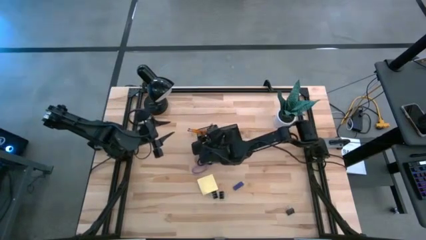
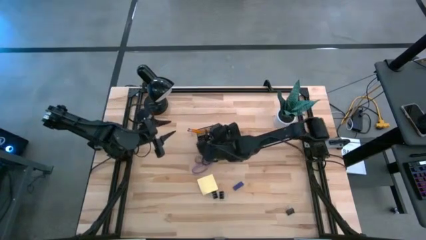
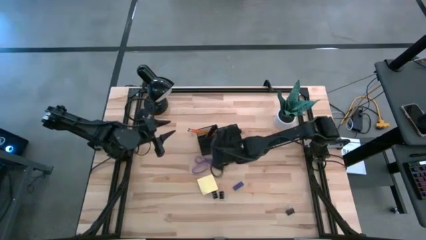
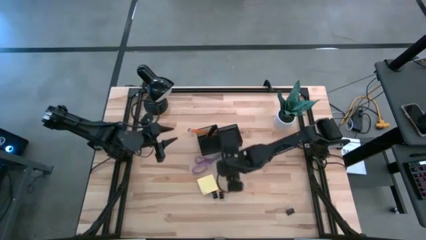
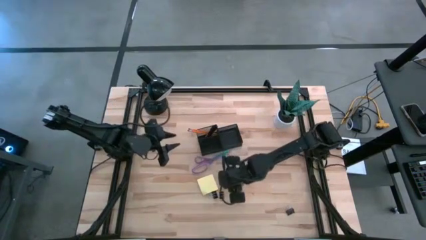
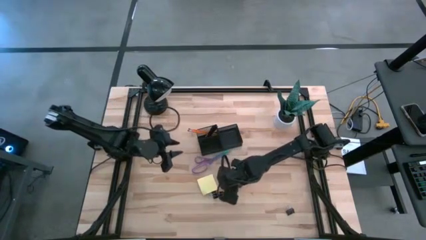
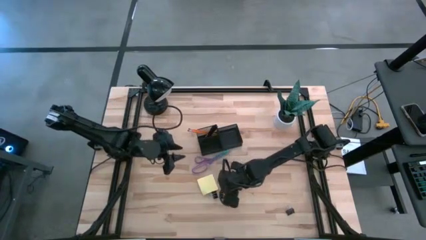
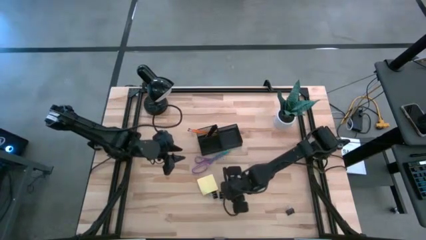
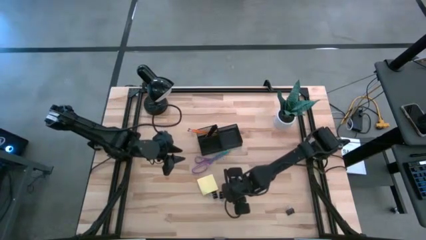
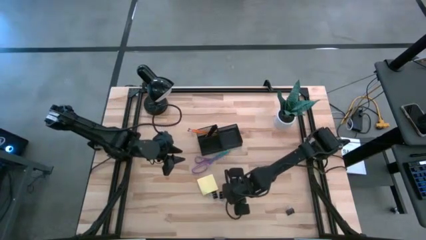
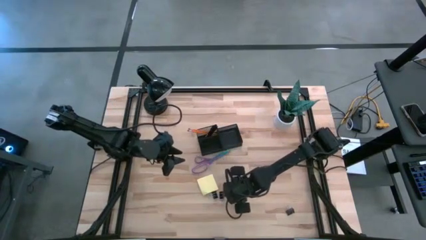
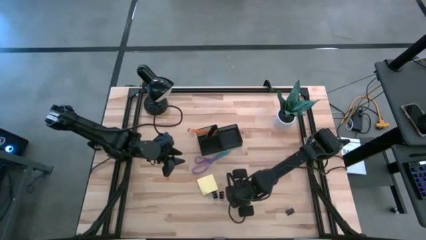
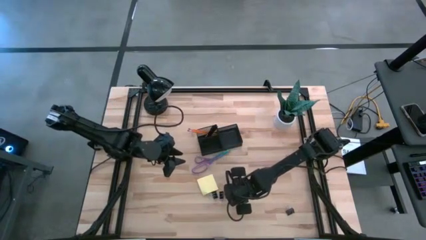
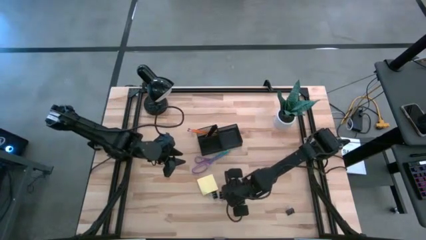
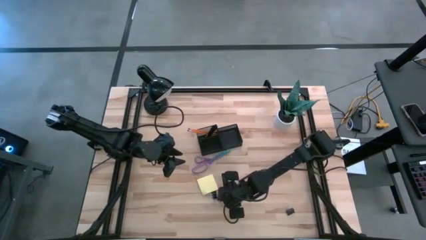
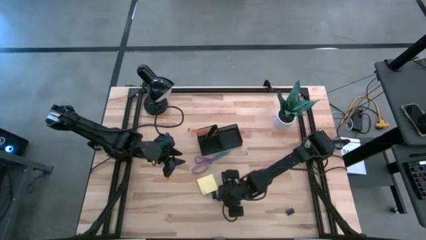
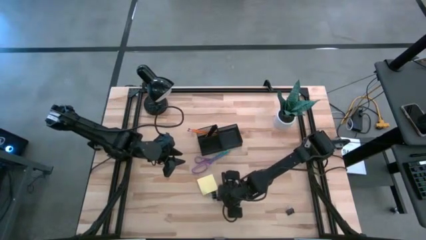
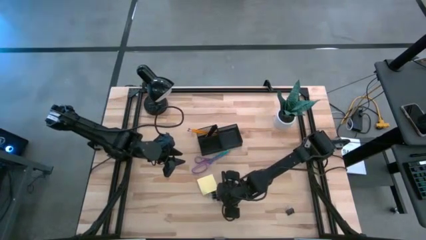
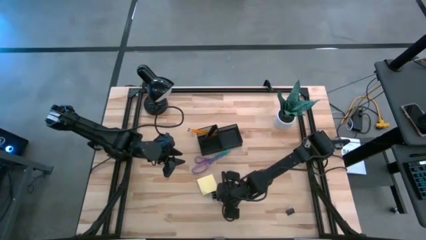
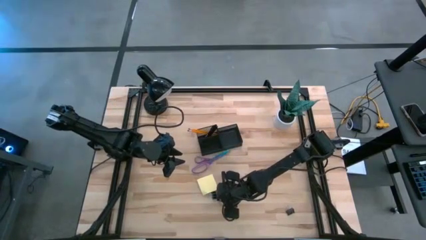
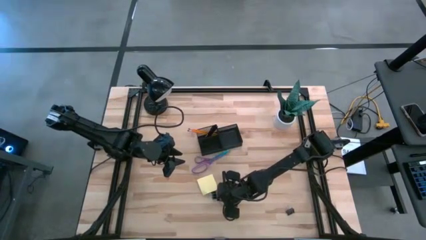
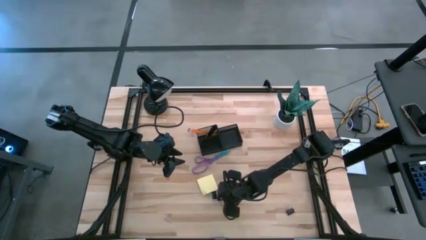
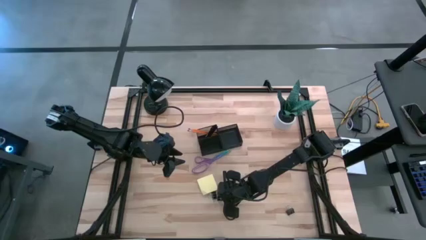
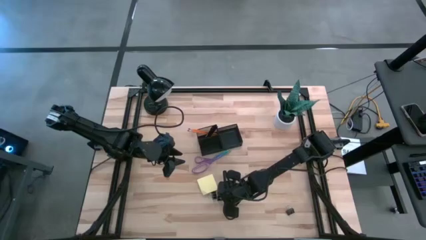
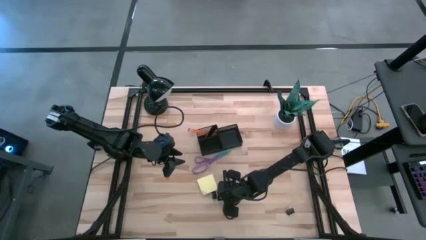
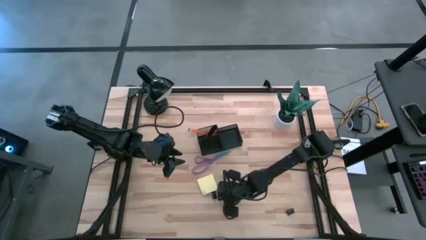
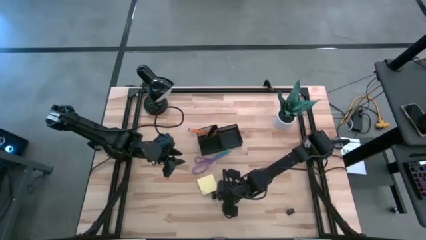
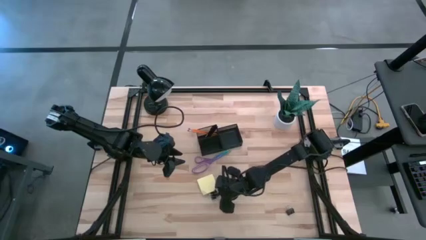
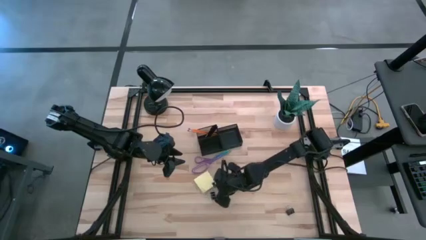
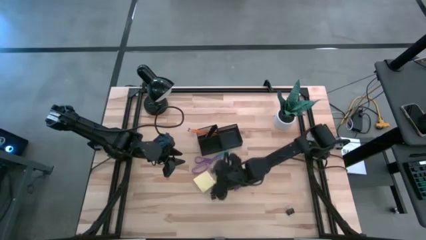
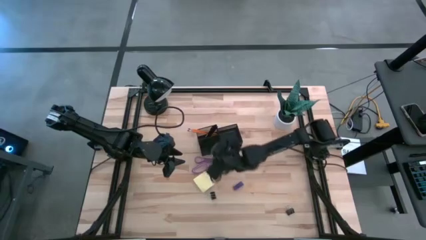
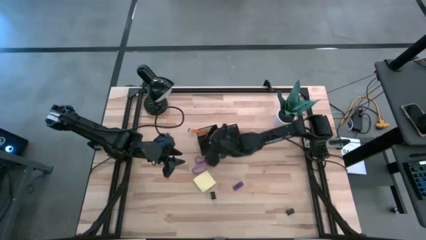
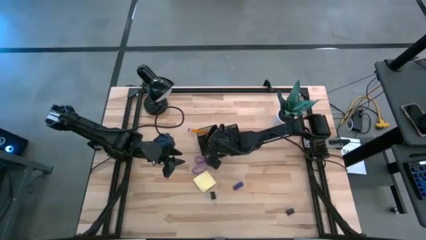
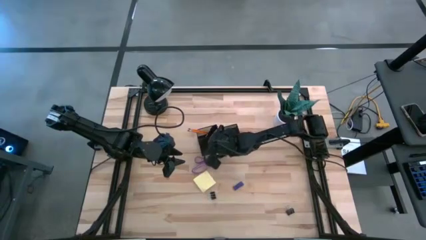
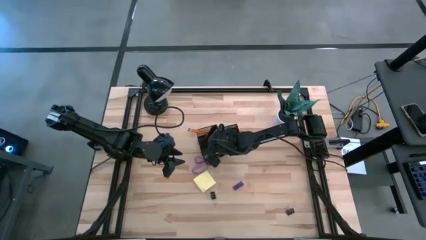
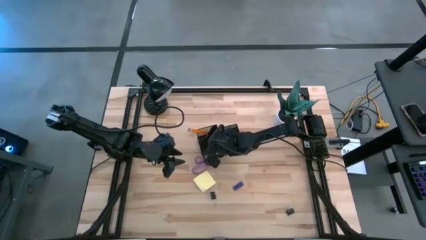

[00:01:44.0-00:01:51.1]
Task: Pick and place office supplies into organizer
Put the middle black binder clip into the black desk organizer

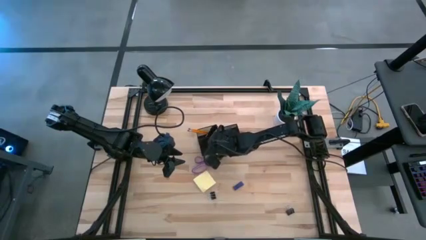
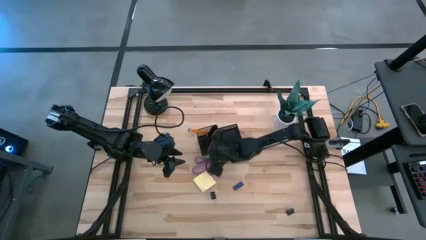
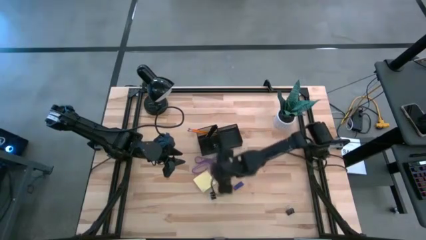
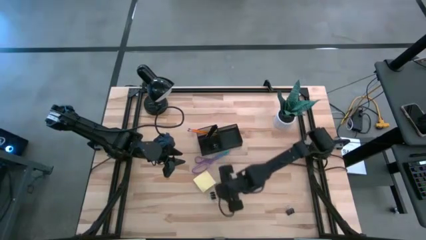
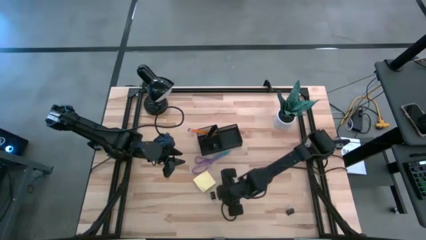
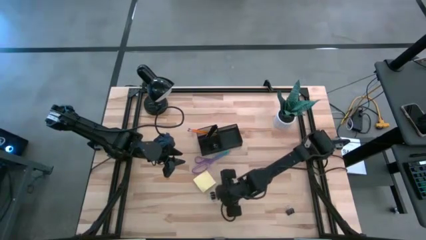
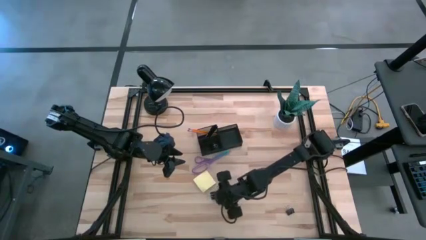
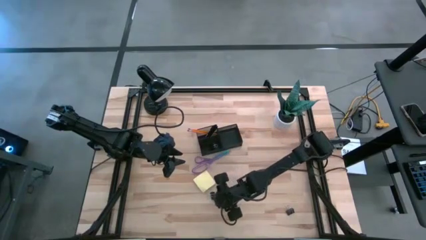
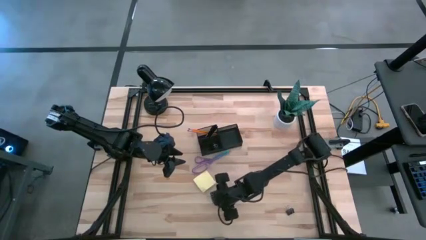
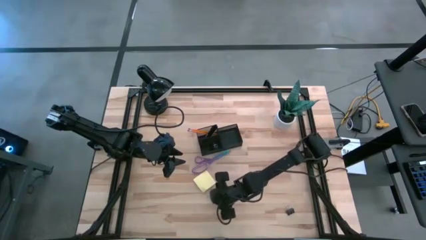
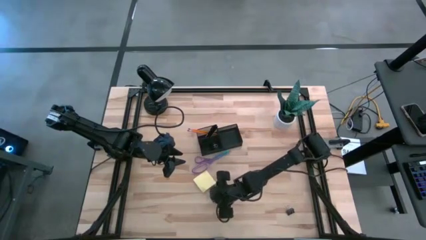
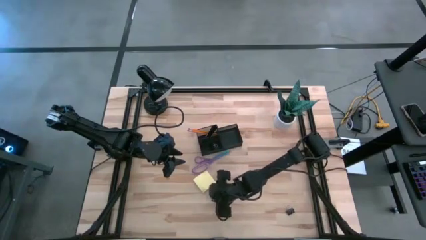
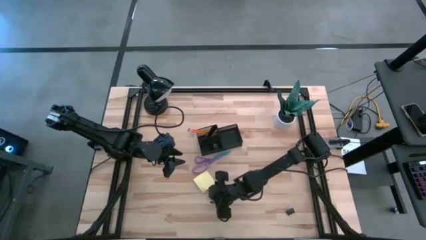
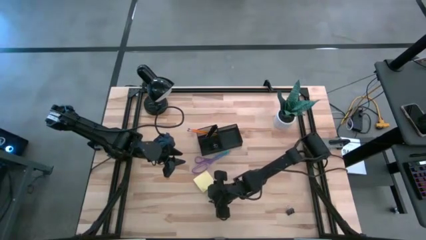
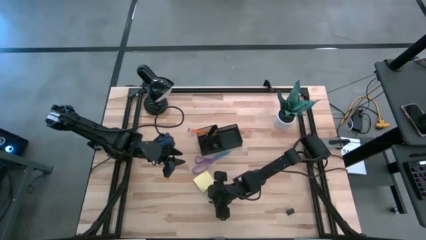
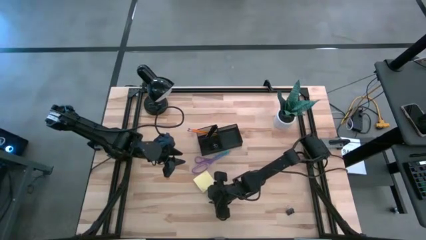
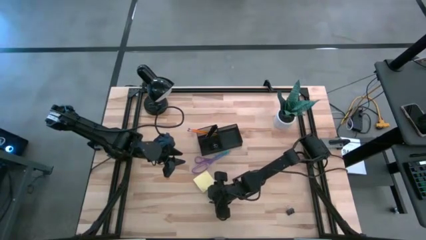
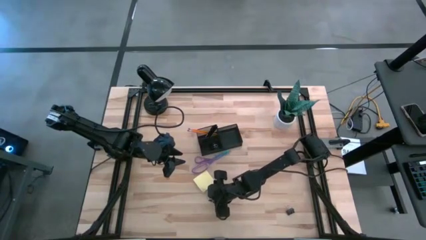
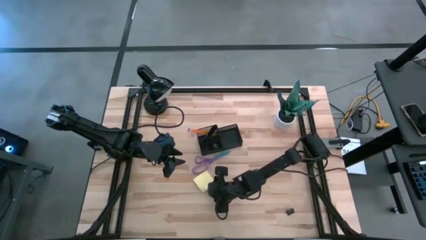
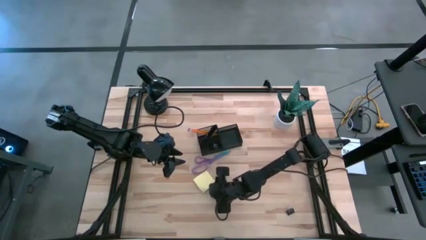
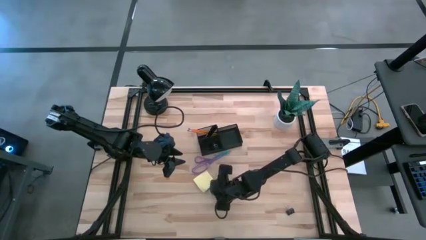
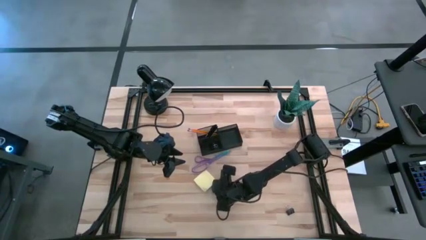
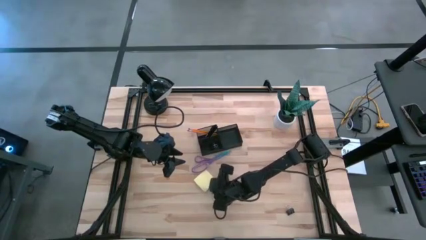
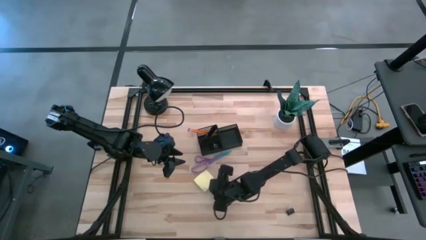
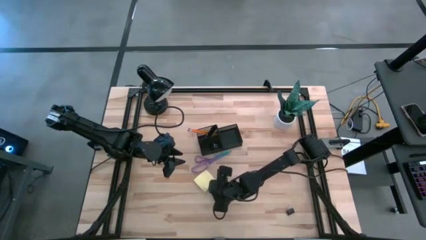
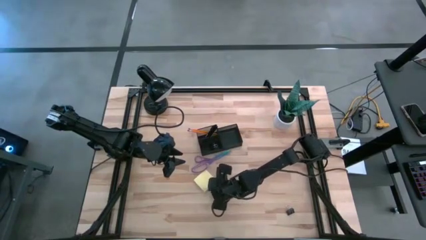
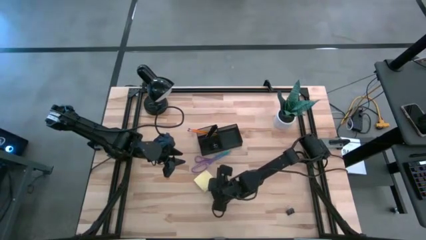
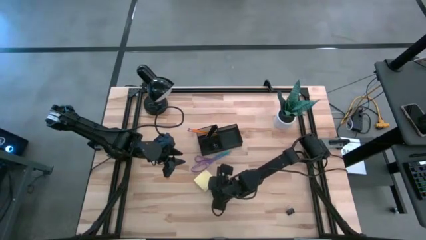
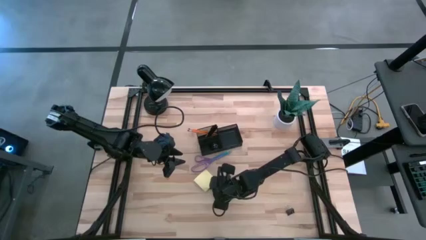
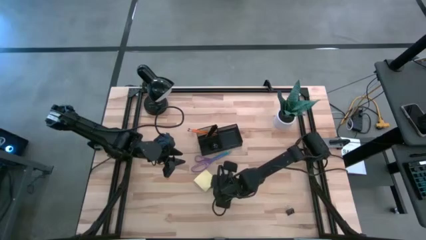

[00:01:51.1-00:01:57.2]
Put the left black binder clip into the black desk organizer

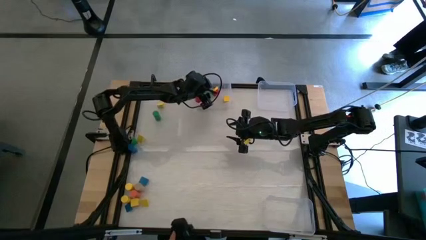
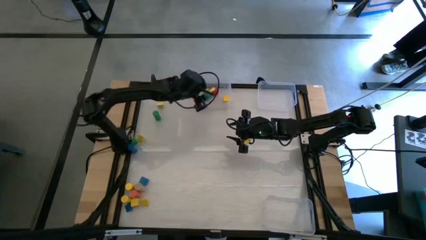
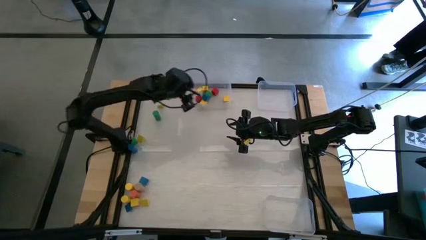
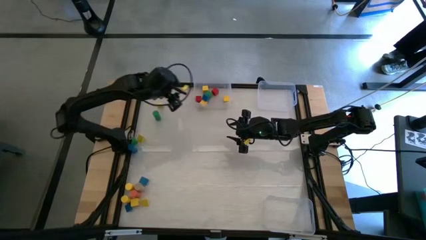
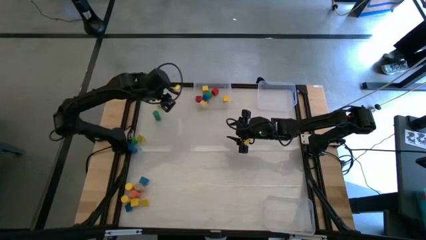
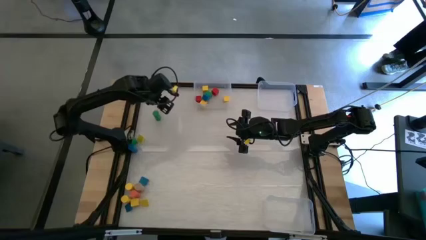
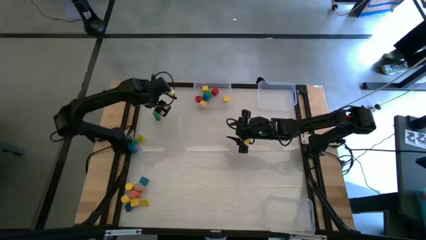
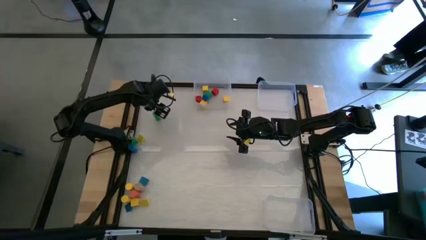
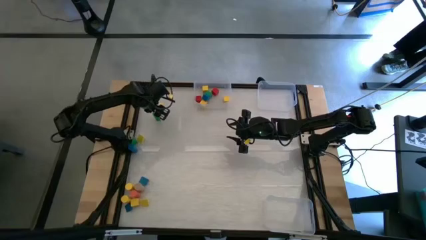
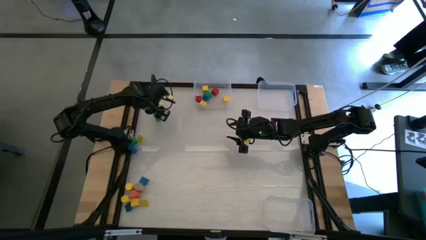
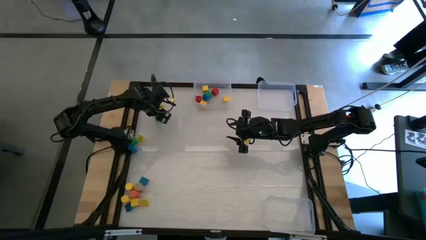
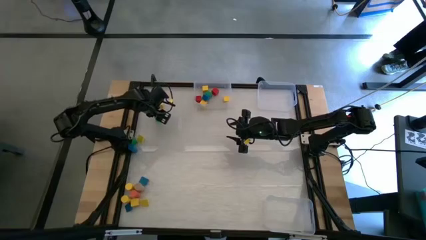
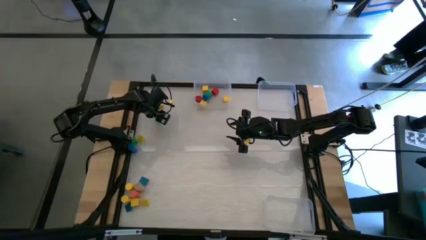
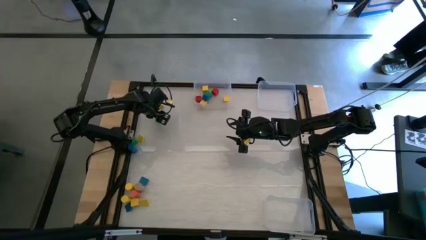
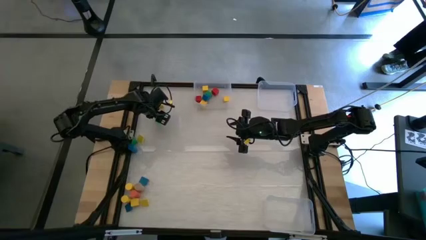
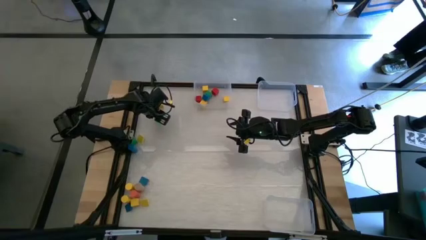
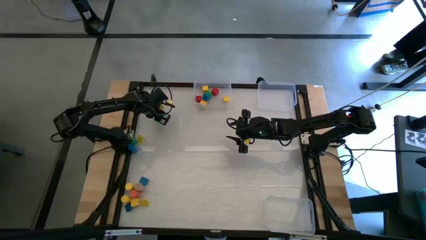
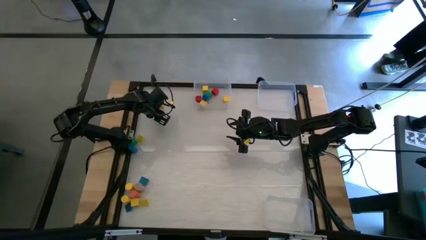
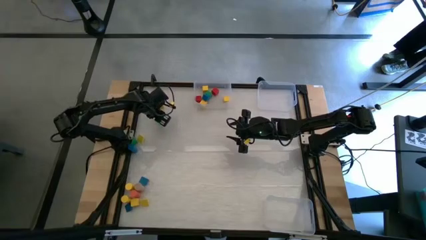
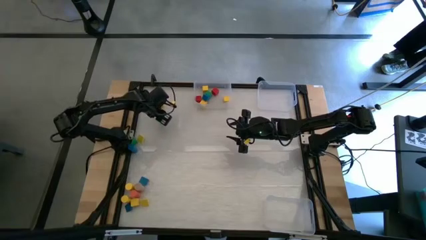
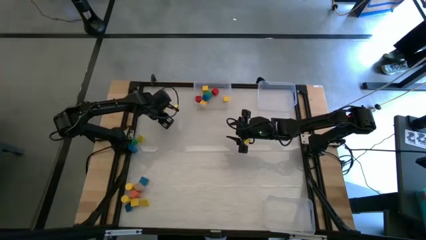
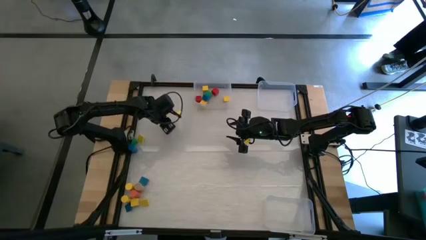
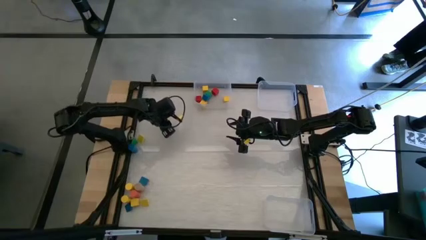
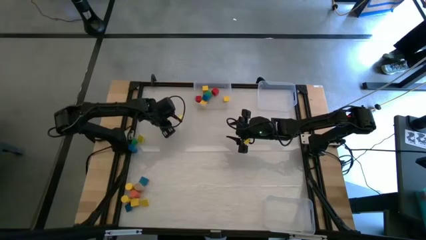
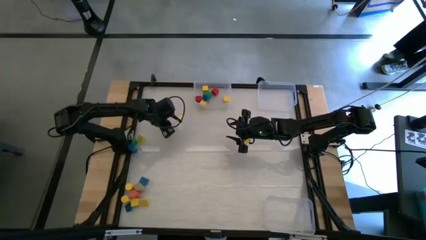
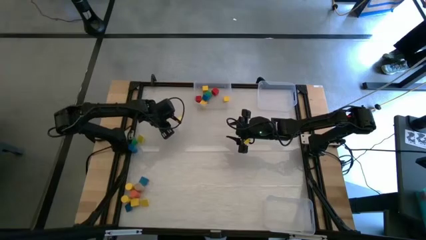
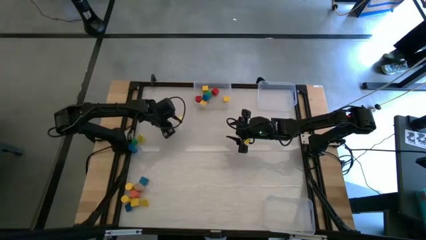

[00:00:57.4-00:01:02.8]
Task: Sort blocks by size
Adjust the green cylinder block
